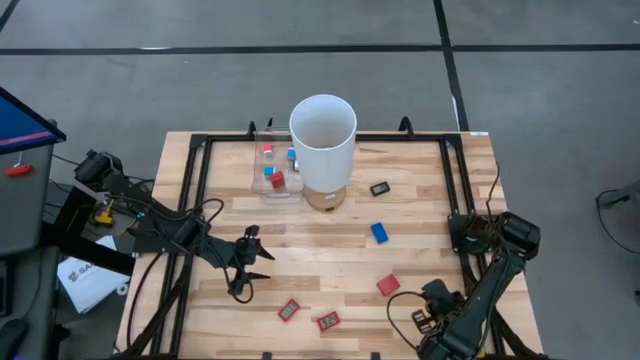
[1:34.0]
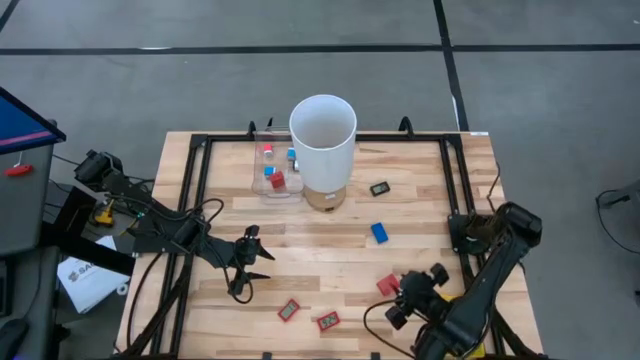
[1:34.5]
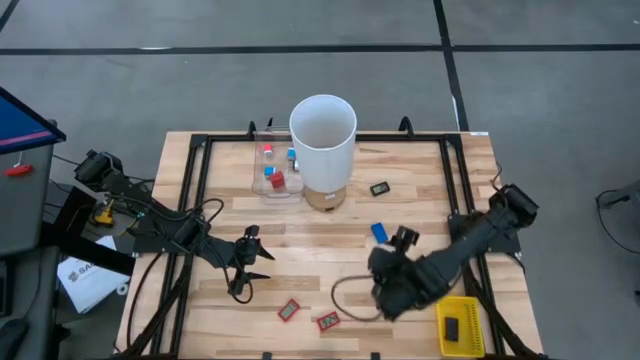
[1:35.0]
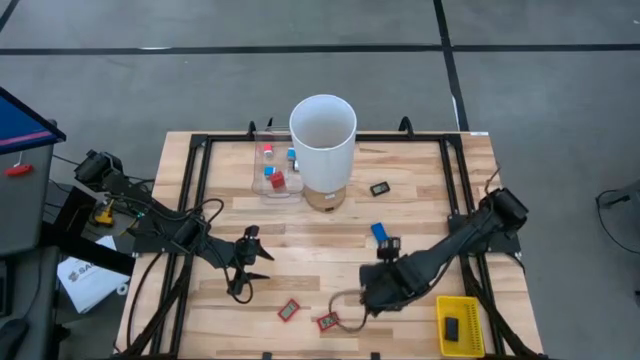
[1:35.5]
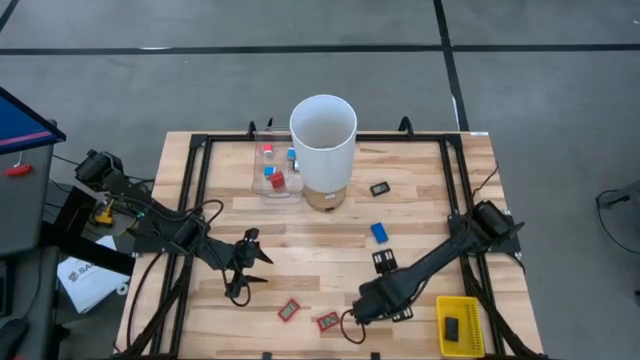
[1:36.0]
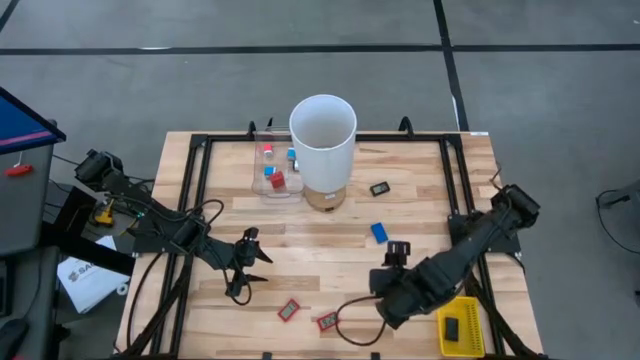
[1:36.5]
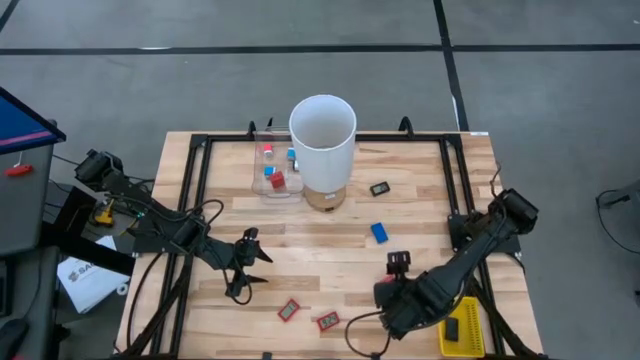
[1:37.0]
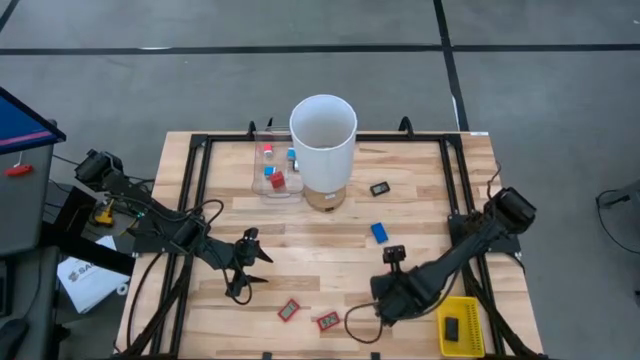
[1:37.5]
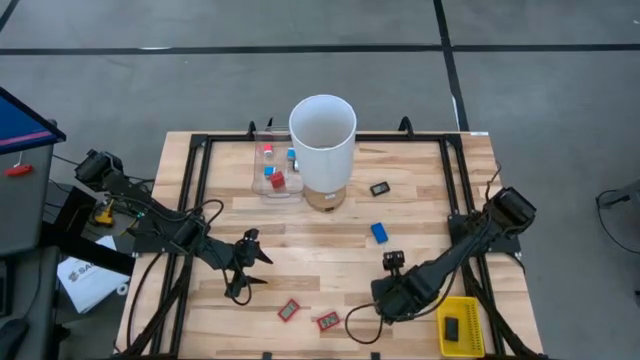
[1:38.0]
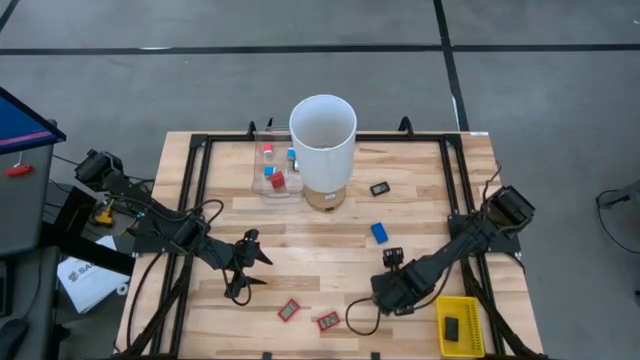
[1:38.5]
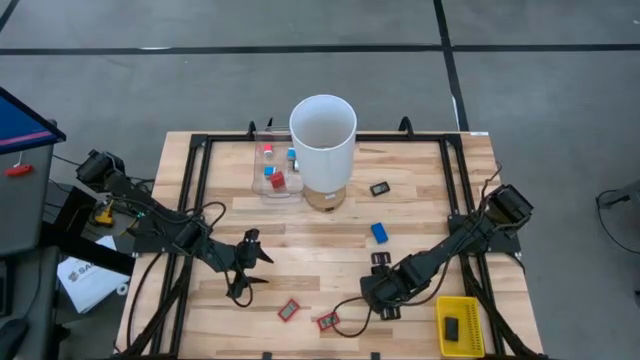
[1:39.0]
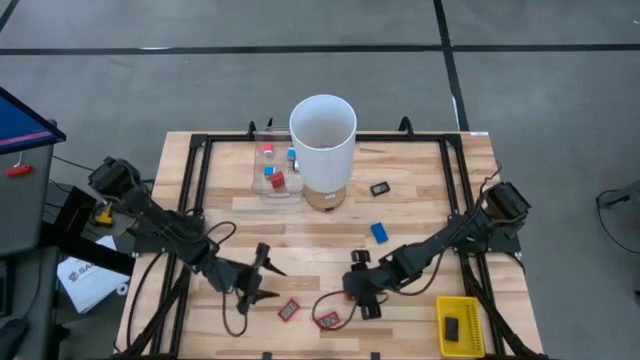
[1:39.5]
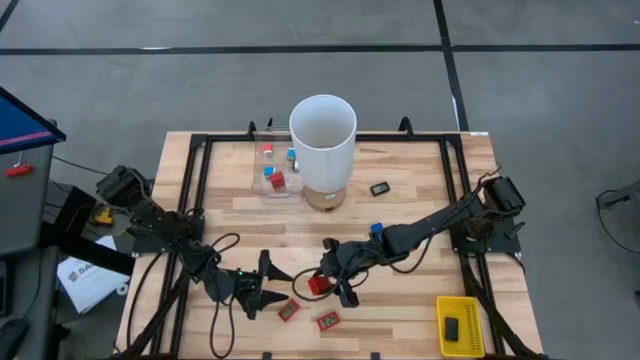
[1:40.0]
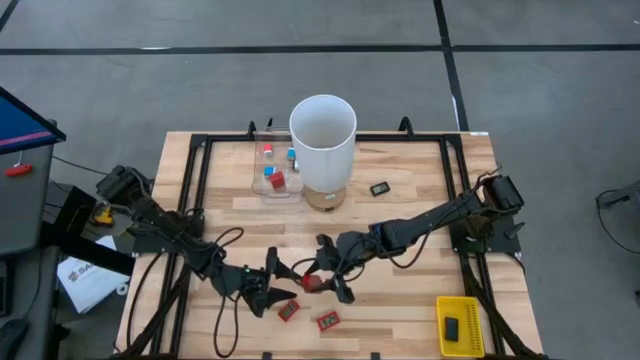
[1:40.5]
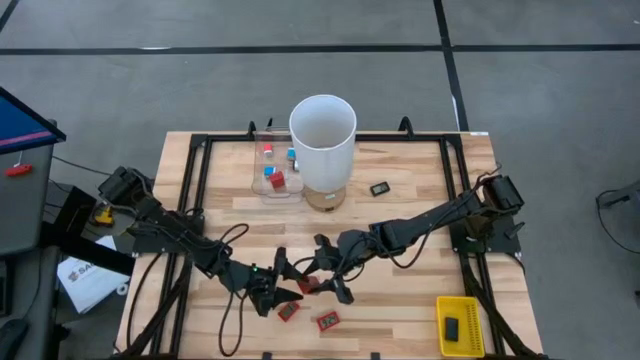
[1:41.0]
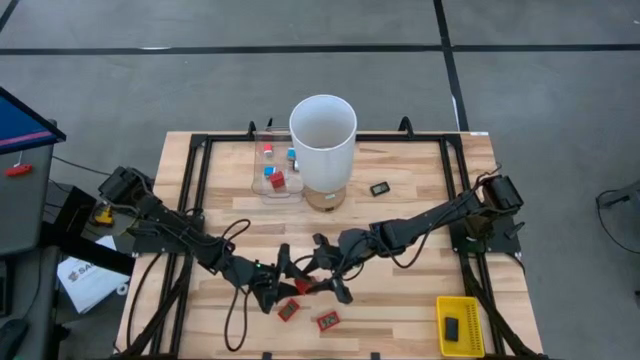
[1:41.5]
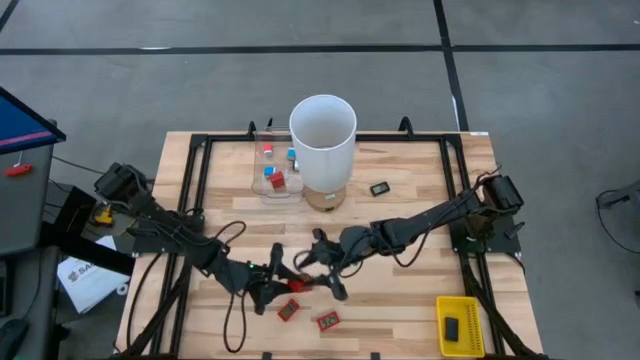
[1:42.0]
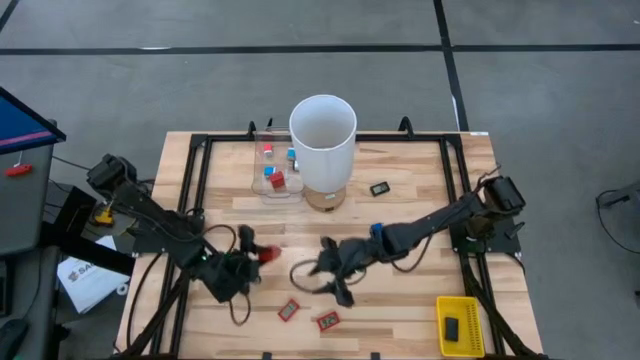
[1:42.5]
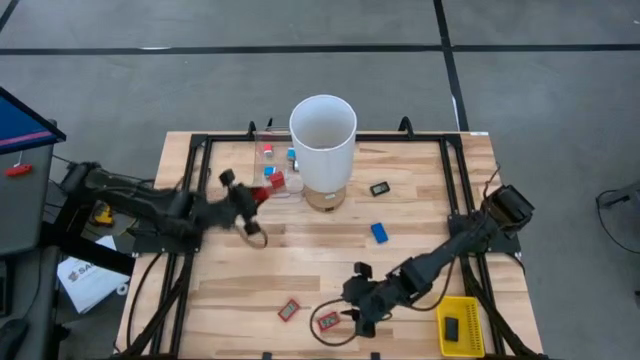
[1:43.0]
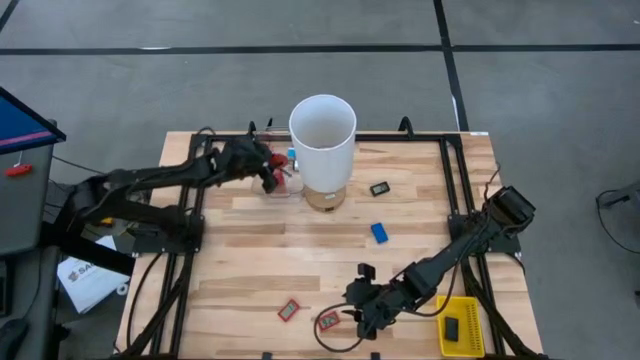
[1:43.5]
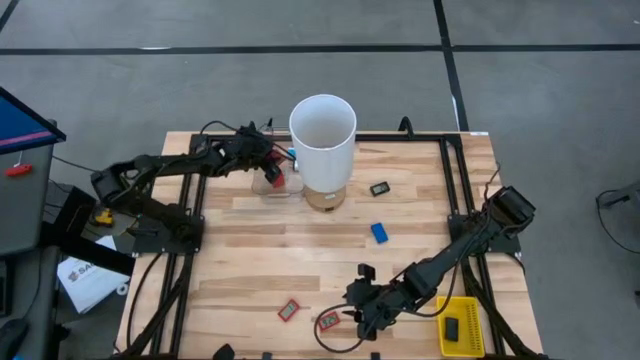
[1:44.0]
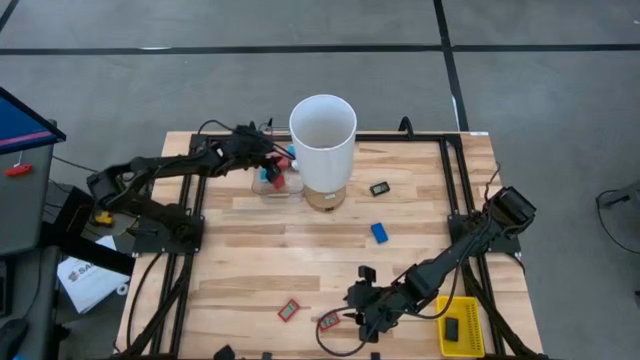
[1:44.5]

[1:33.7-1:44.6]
Task: Pick & Place Office items
Put the red charger adapter into the transparent bin

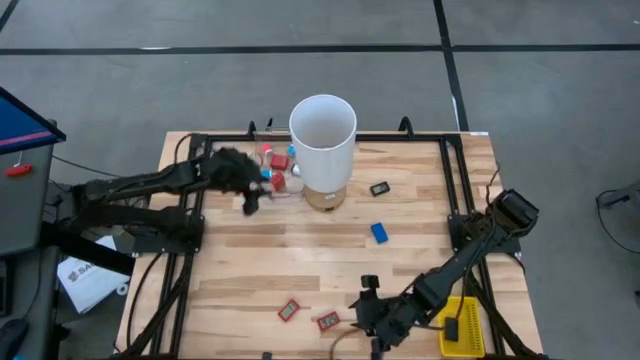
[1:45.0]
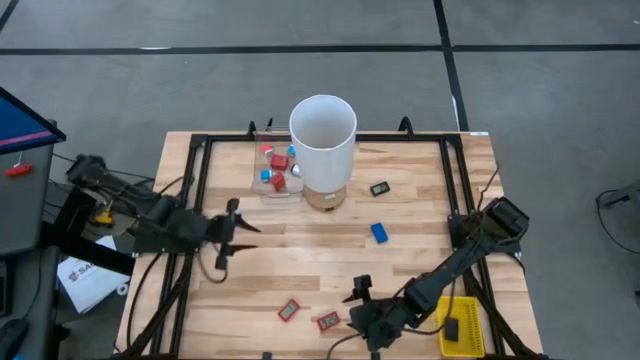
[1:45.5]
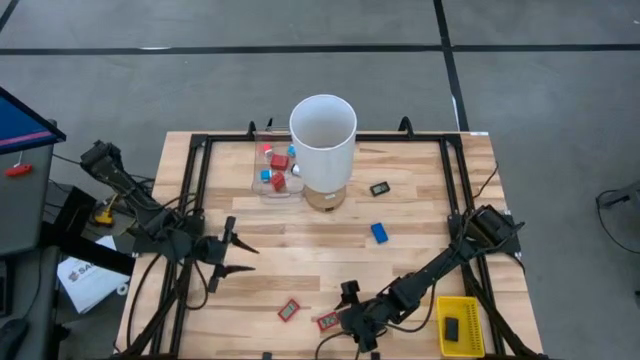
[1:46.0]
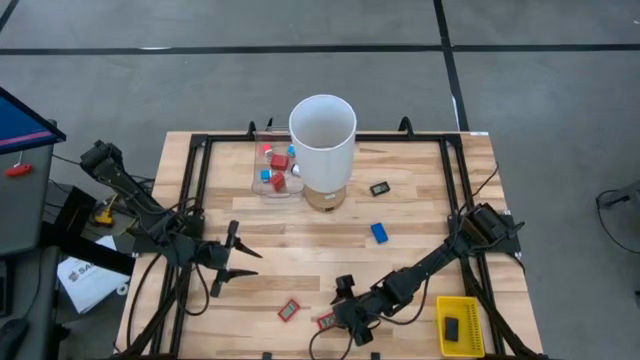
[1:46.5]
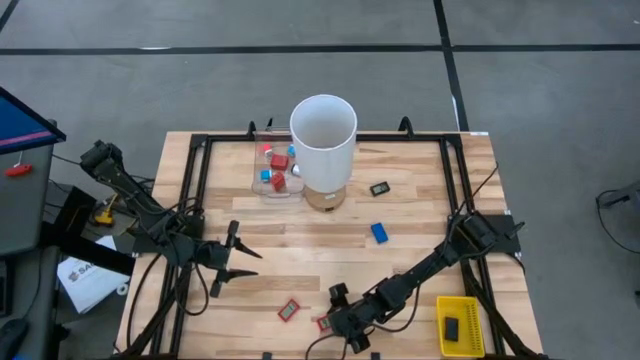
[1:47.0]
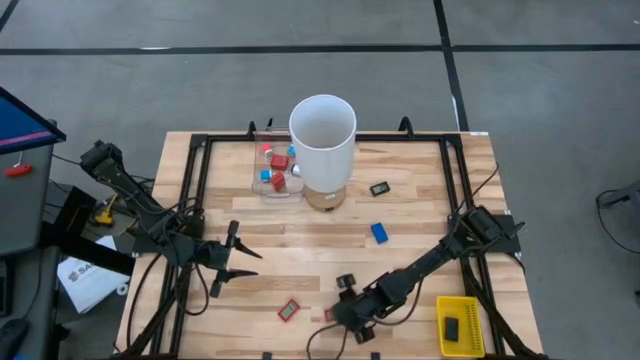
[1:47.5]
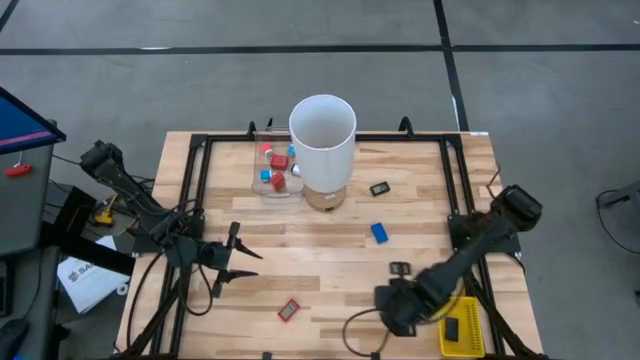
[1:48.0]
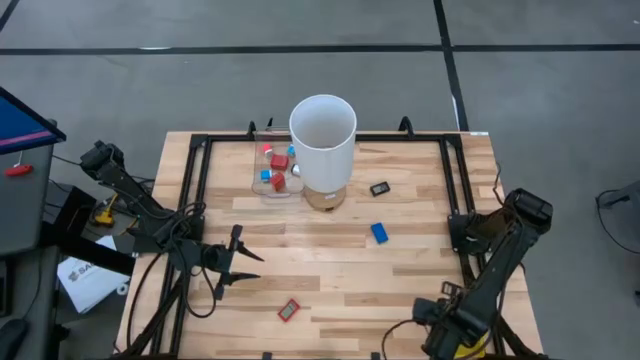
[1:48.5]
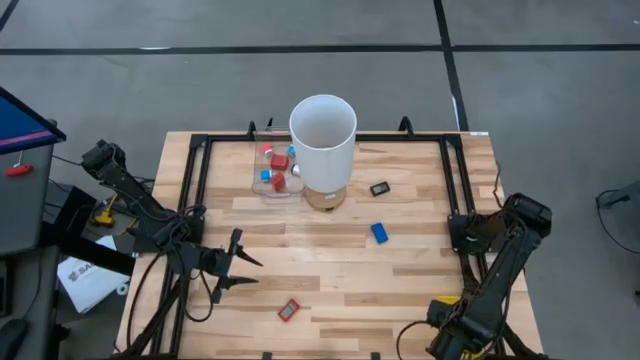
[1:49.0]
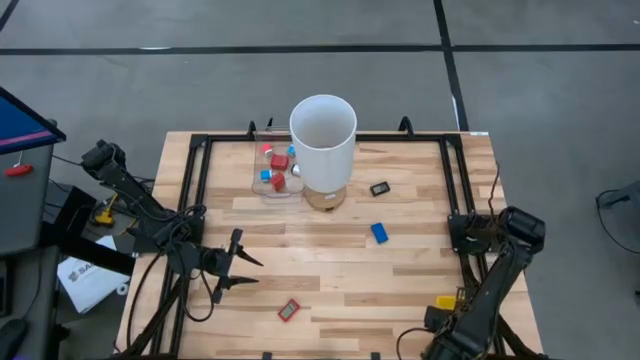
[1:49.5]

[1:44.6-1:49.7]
Put the right red digital timer into the yellow basket

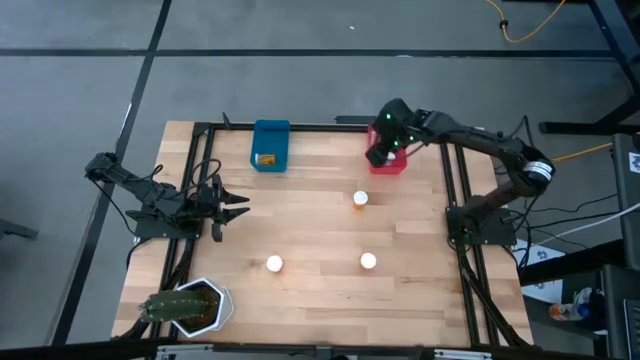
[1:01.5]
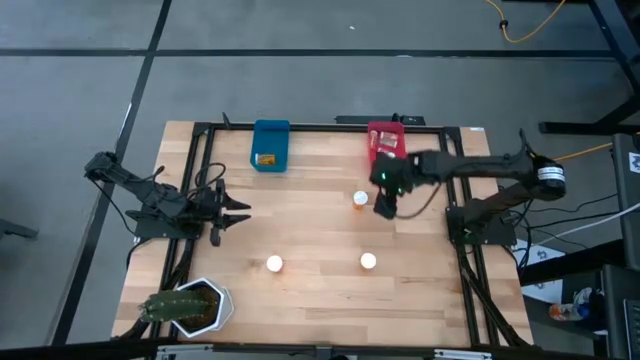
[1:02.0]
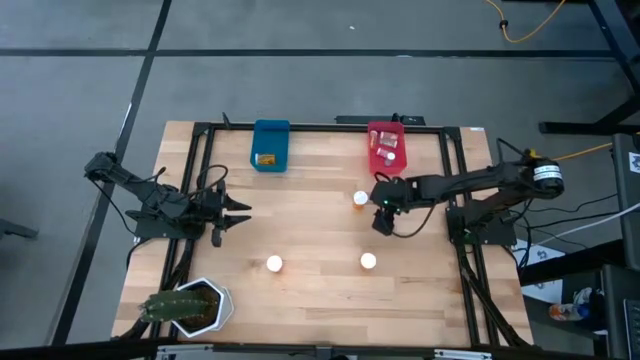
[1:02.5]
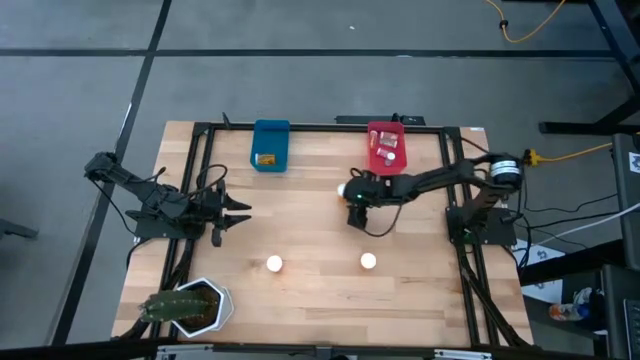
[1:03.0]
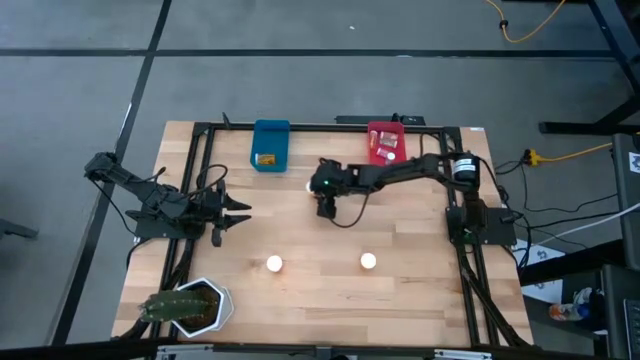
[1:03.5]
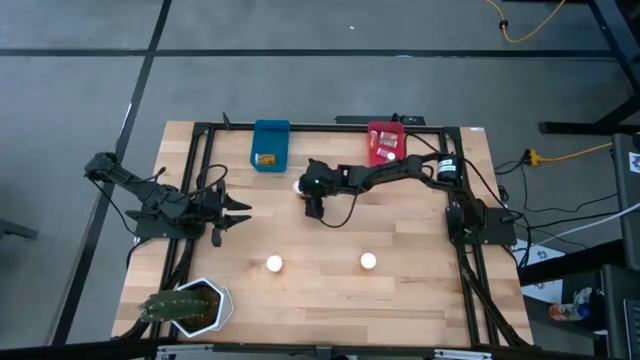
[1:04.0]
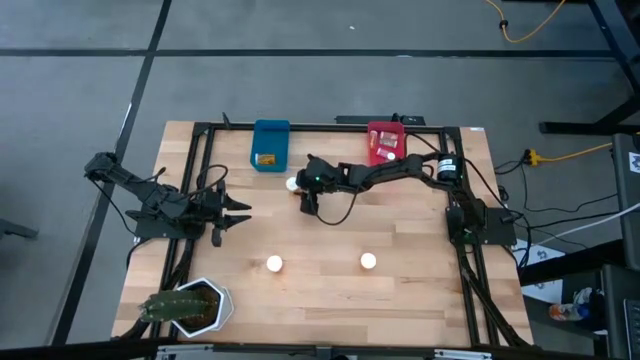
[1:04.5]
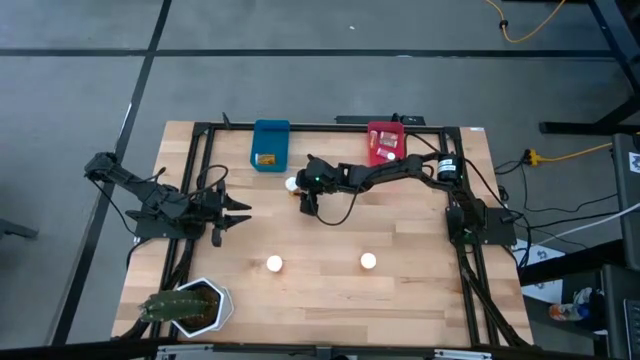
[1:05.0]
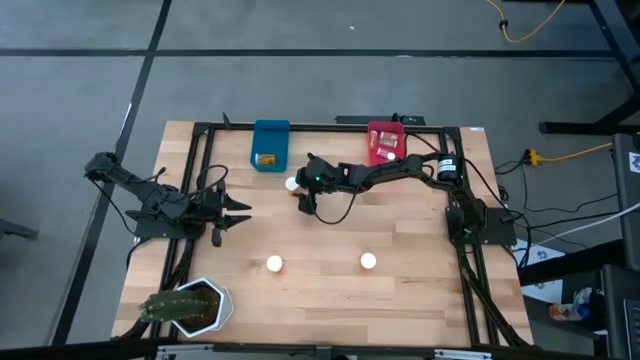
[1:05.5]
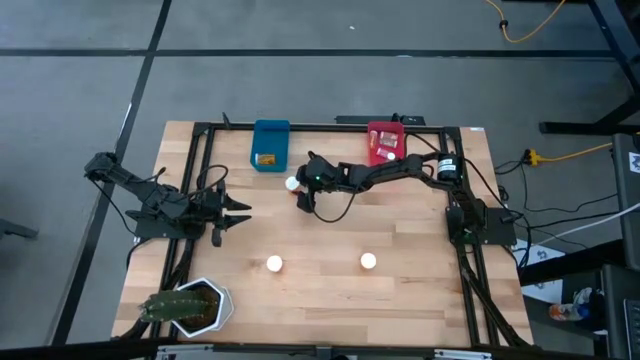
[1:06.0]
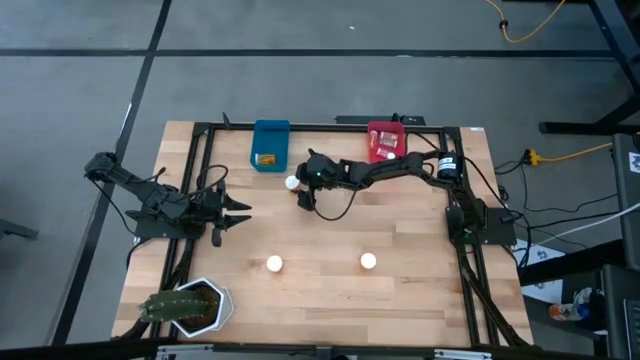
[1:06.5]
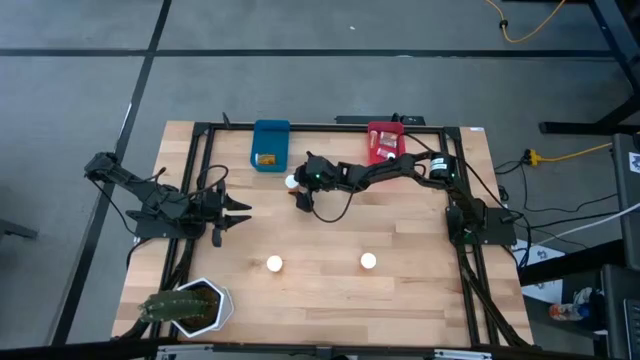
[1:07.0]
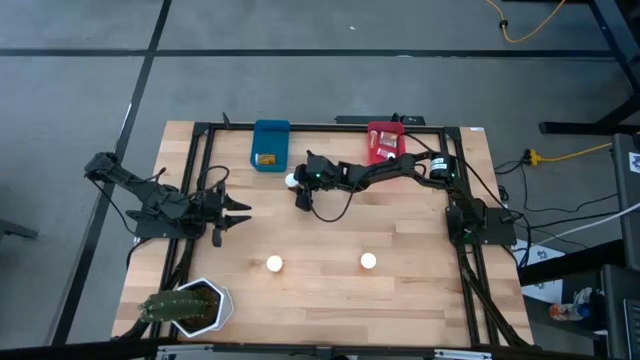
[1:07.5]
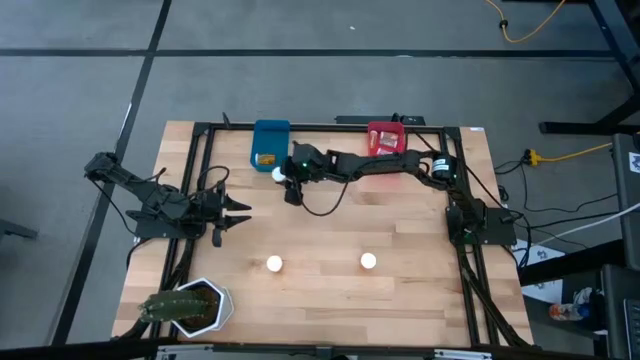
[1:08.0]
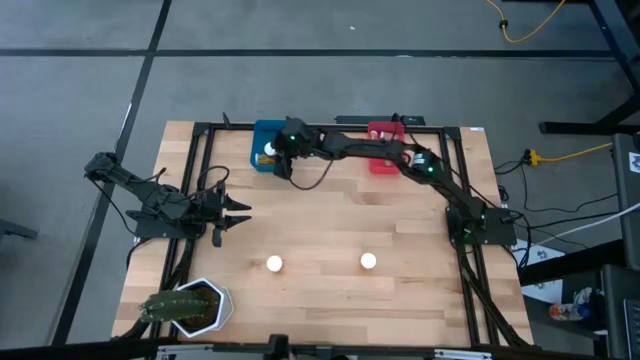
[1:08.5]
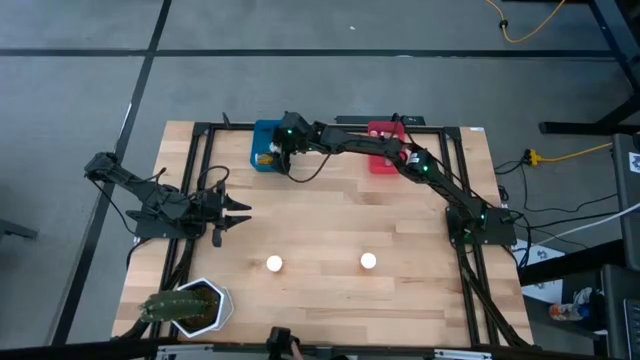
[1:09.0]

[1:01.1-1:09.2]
Task: Pick and place medicine bottles into bin by pill shape (circle, oval)
Put the big orange pill bottle into the blue bin
